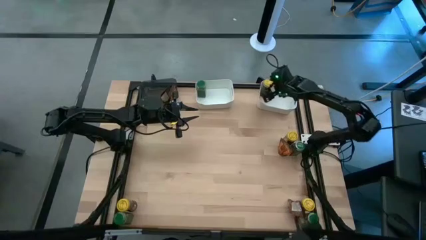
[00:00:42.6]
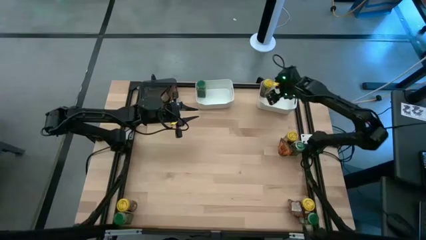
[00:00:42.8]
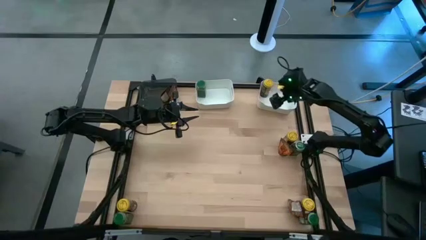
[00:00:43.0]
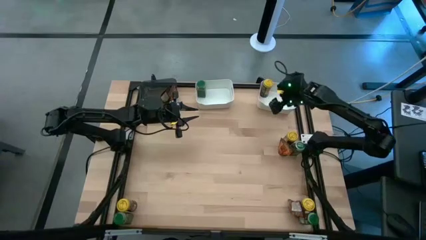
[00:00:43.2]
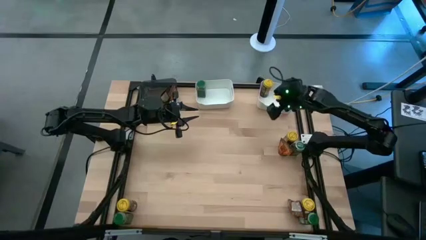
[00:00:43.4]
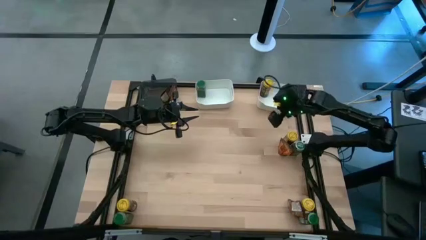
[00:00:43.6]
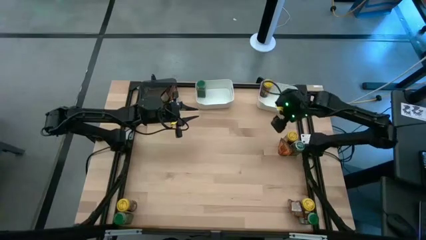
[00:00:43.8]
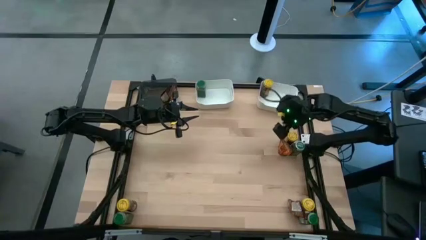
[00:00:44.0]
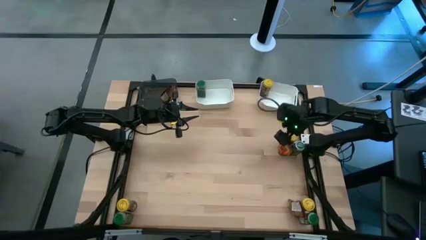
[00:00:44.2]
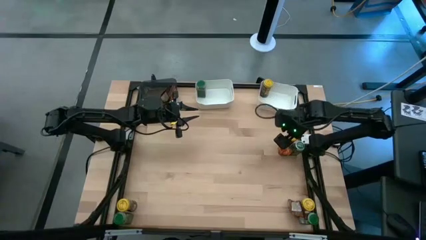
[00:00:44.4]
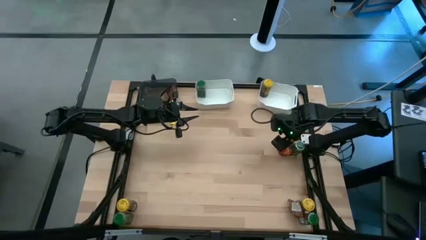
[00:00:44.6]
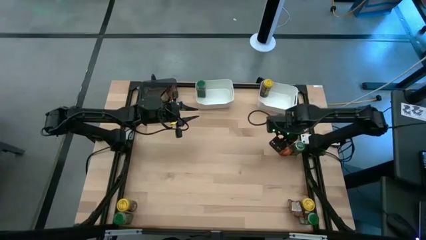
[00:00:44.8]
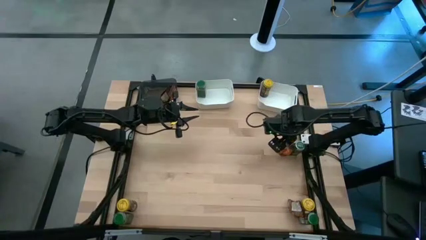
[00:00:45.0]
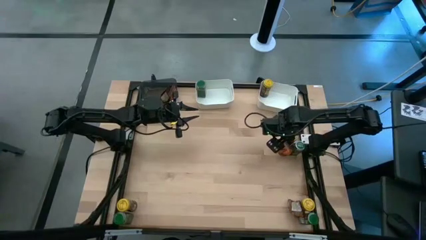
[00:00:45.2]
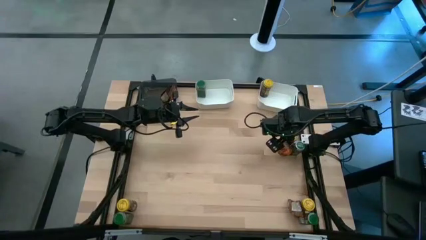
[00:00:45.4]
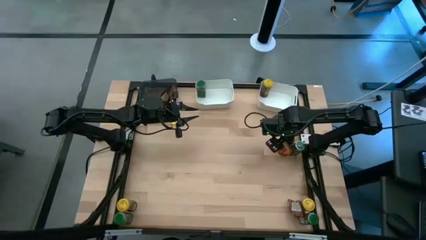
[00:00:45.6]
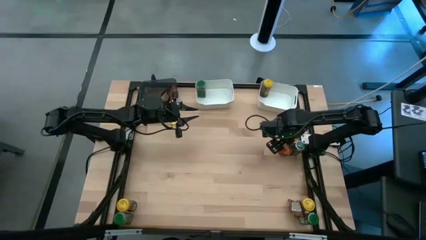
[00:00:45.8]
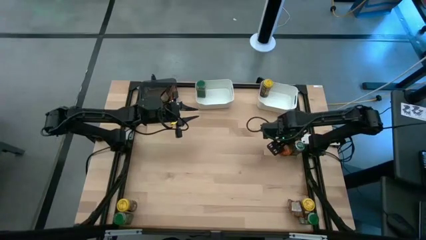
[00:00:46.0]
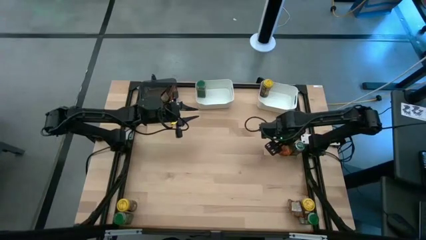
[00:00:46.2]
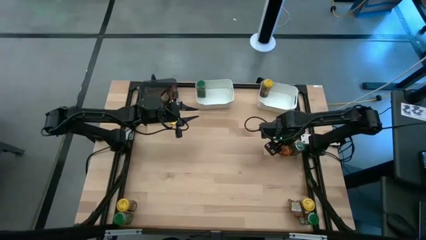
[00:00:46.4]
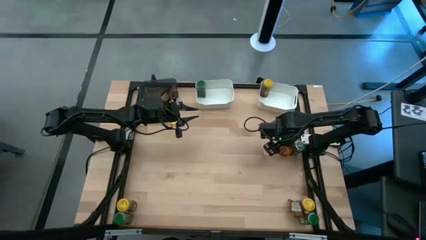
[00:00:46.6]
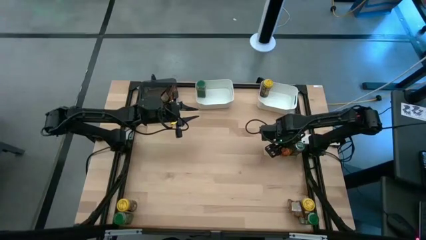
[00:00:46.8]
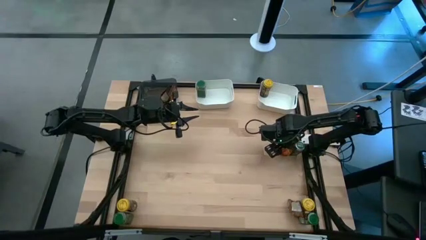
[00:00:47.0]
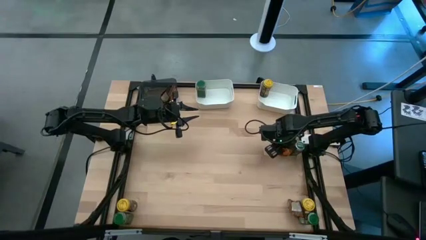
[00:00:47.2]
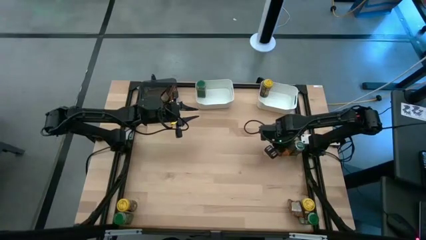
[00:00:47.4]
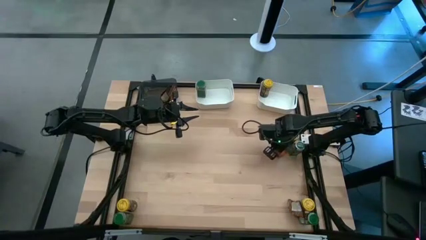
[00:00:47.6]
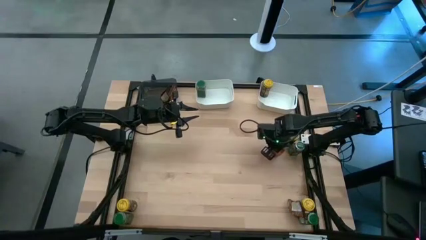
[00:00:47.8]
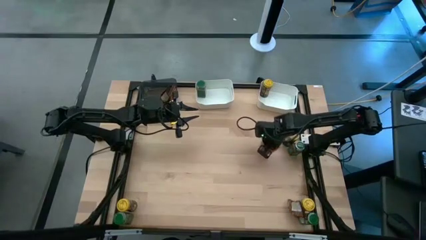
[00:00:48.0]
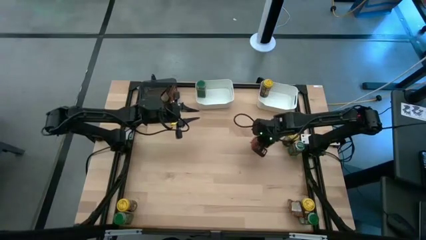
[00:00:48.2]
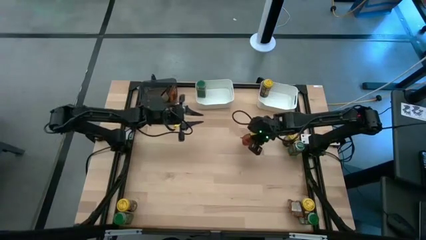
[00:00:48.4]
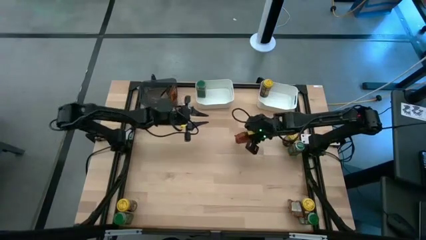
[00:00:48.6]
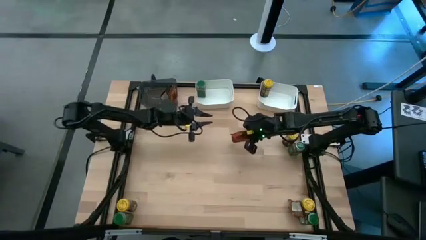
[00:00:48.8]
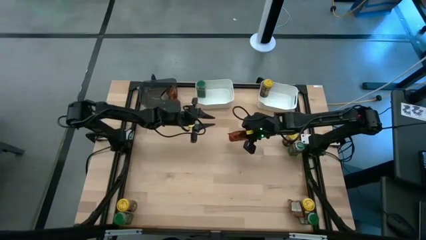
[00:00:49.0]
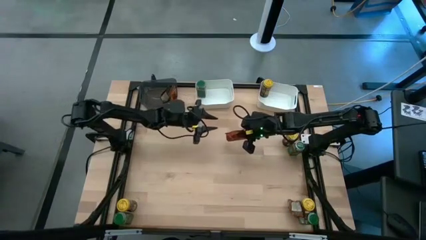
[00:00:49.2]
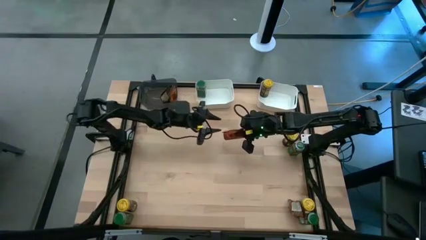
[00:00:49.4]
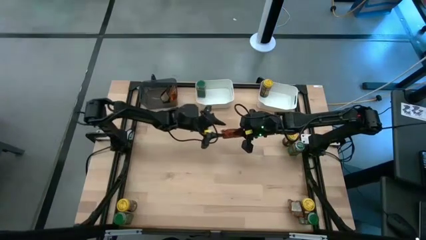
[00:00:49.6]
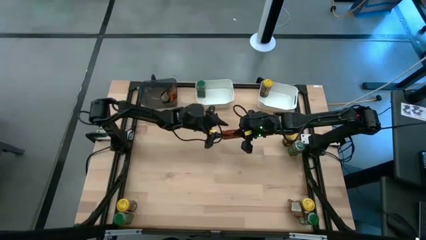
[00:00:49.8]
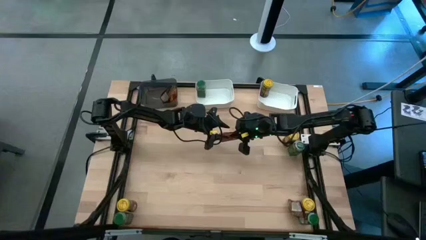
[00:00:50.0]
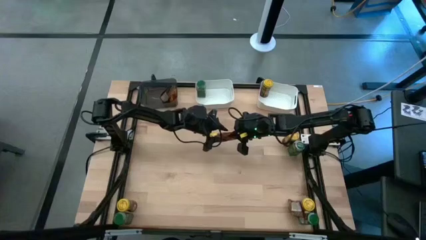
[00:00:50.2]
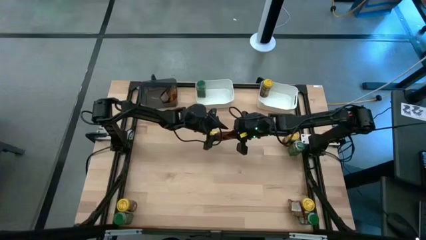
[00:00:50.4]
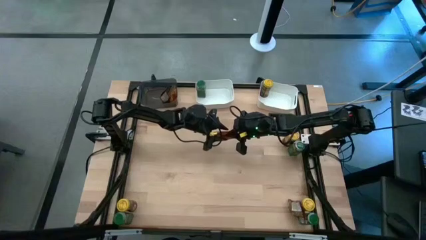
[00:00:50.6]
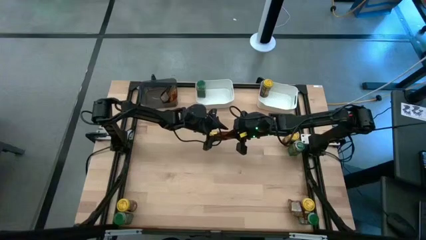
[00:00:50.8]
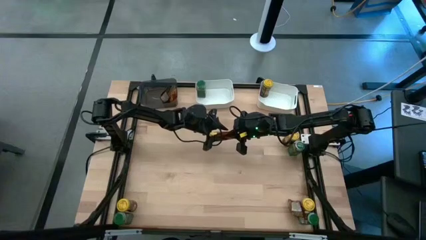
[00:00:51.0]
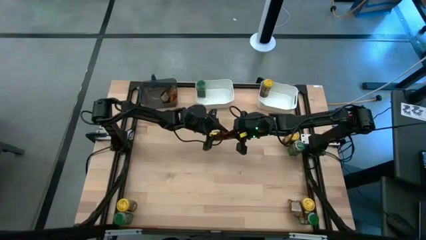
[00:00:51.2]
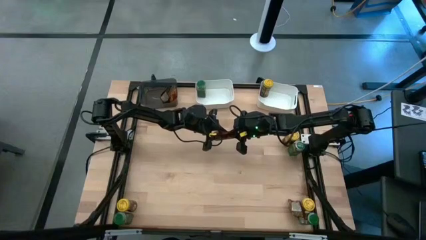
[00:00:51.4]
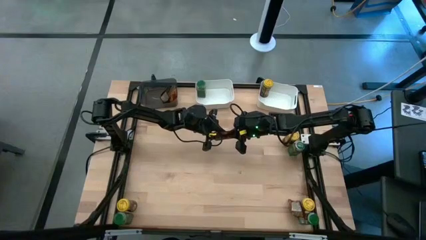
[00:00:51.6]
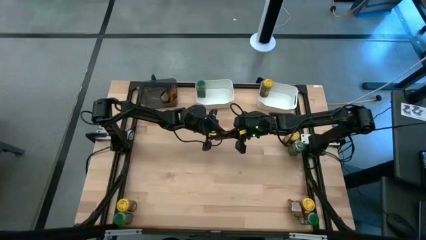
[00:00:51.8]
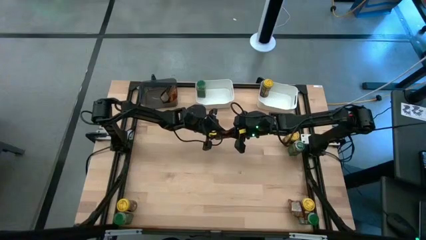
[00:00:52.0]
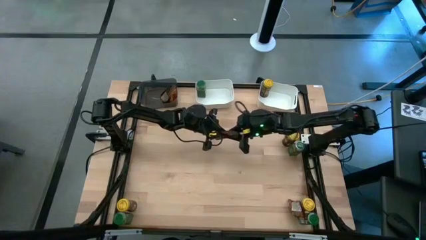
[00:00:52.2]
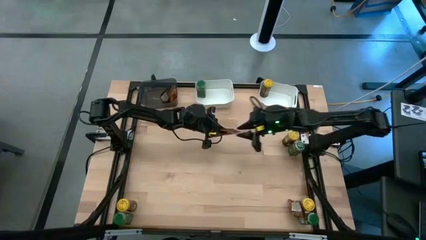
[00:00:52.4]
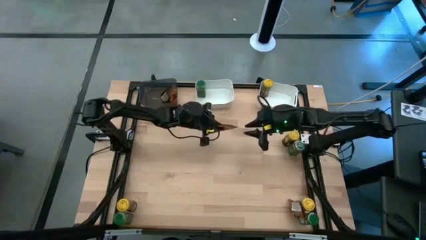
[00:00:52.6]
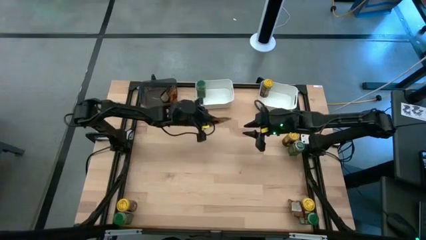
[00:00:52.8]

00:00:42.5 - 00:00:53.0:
Task: Sort spices by type
Put the top brown seasoning bag into the black bin

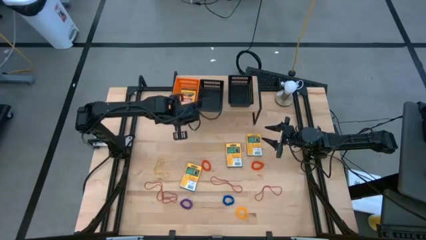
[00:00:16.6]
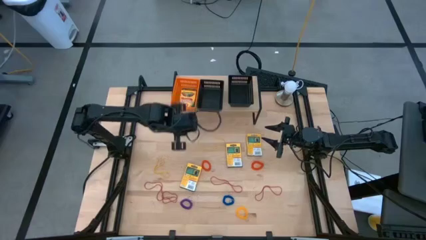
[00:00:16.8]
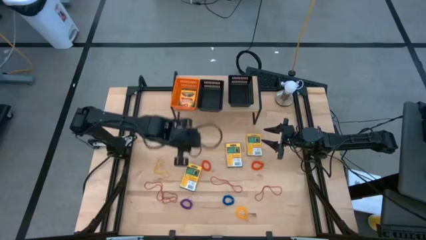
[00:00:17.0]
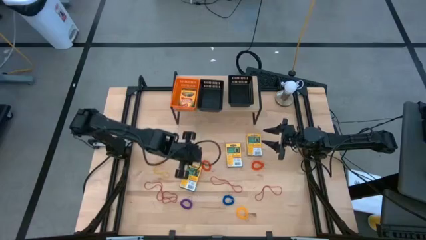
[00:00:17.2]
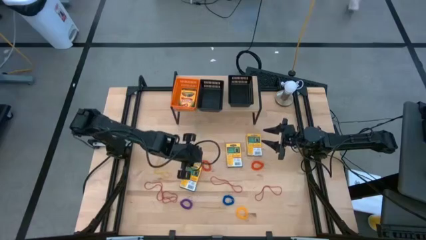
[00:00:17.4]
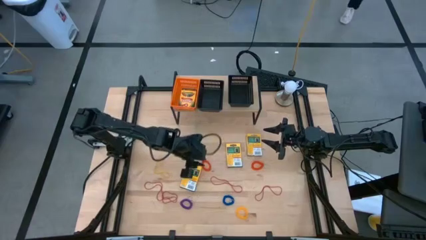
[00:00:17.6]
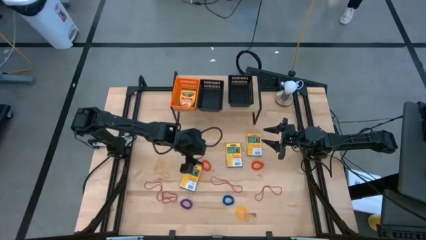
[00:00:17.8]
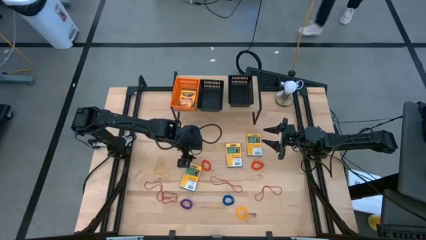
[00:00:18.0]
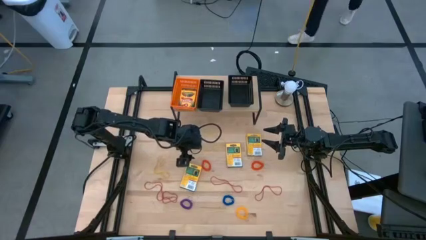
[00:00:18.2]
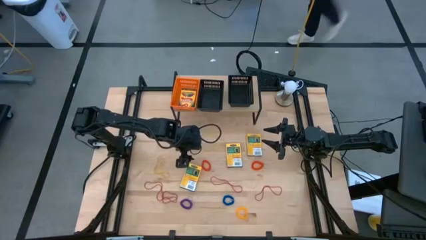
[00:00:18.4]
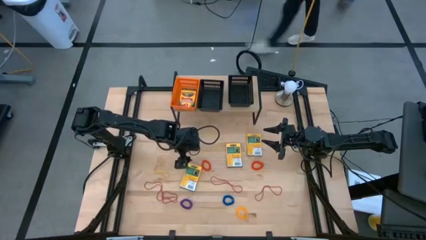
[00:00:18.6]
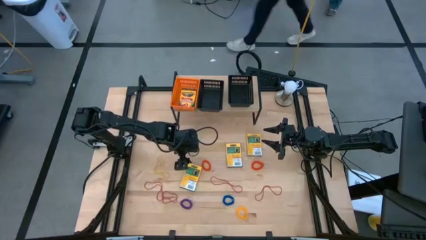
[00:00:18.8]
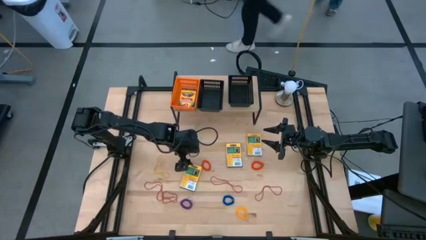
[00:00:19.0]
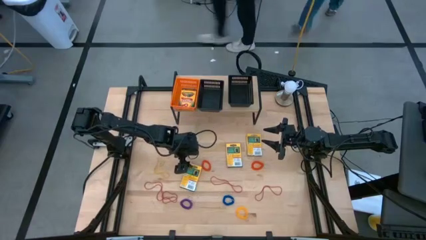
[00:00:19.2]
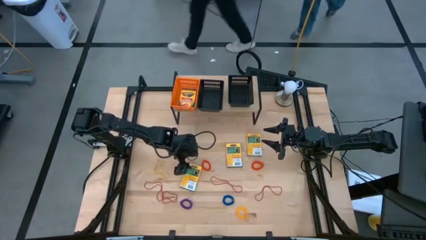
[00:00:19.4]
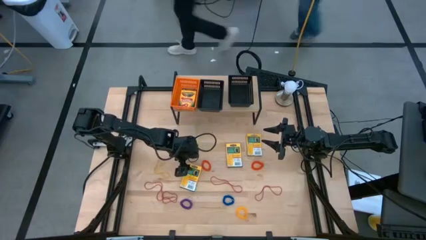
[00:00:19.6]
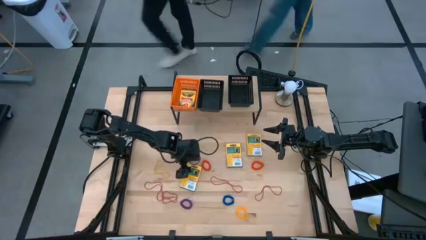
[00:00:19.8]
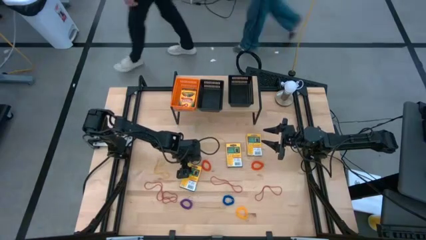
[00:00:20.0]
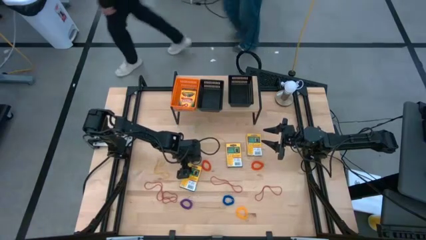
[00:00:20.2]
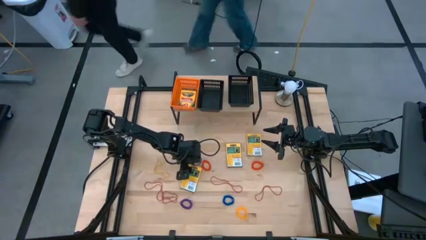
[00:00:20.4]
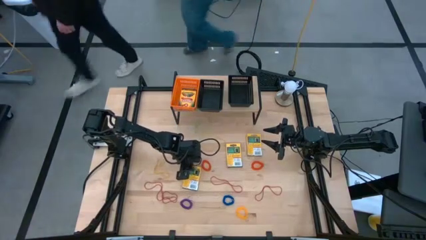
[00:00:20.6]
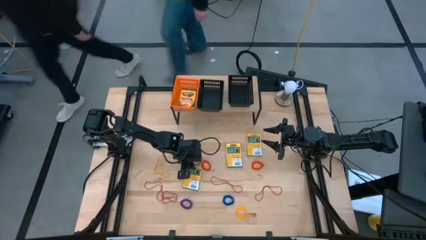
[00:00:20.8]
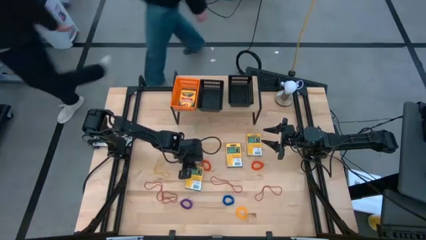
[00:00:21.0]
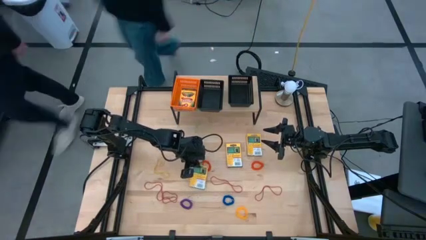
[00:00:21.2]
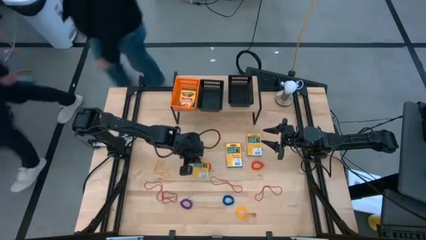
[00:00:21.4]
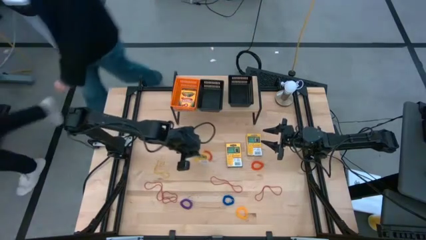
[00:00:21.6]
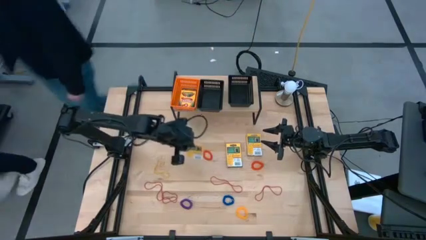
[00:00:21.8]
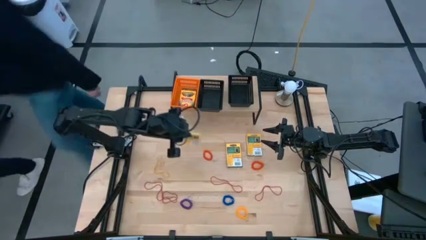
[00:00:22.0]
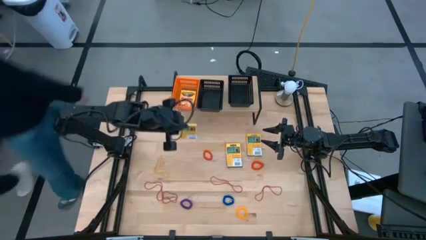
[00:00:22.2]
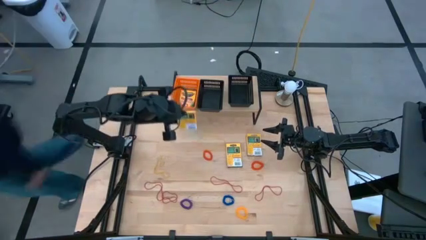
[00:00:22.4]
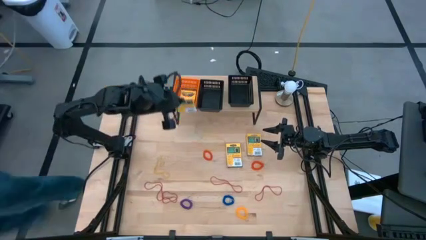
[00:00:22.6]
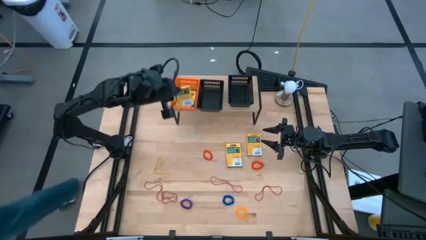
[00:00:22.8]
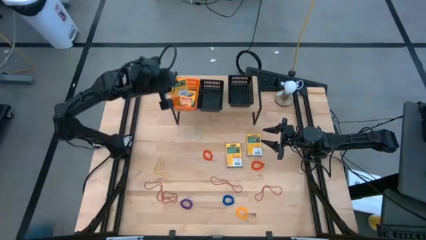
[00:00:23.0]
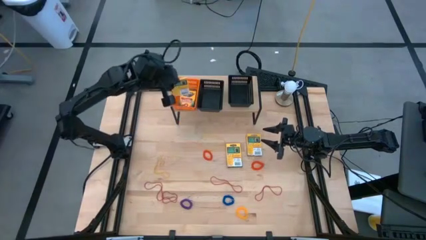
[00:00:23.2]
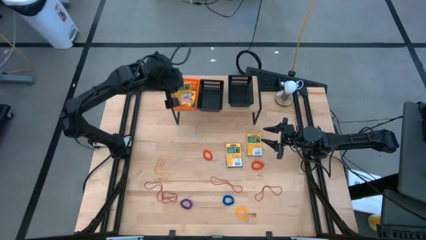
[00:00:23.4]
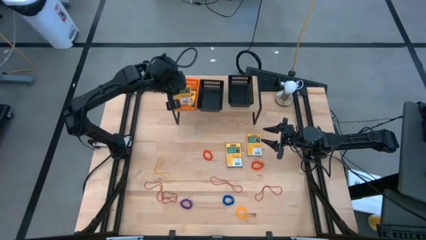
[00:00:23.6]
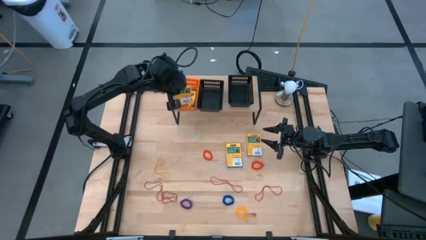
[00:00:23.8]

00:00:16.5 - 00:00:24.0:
Task: Pick & Place Office Desk Supplies
Put the yellow pack of crayons into the orange bin on the shelf
